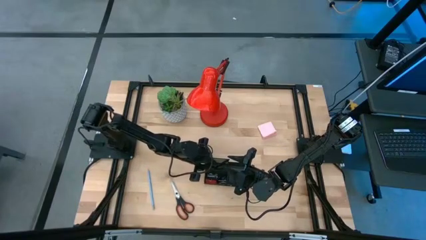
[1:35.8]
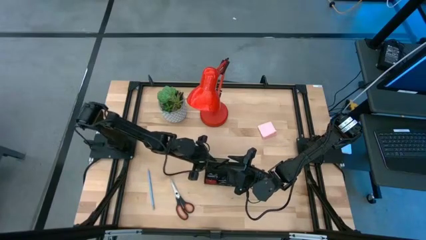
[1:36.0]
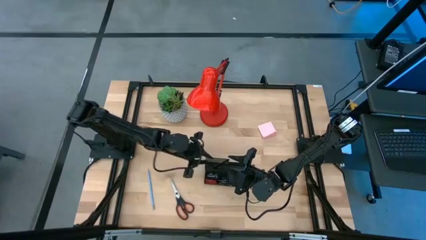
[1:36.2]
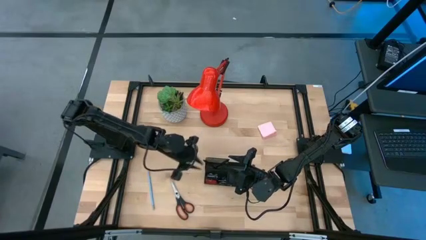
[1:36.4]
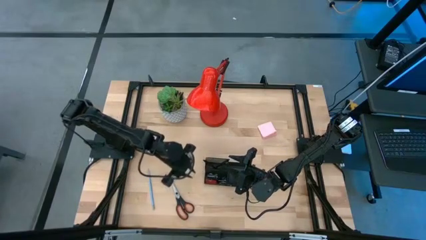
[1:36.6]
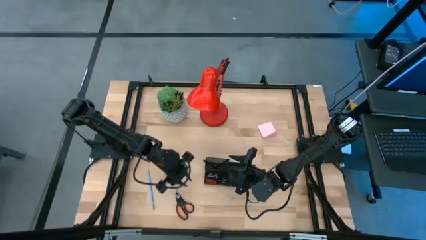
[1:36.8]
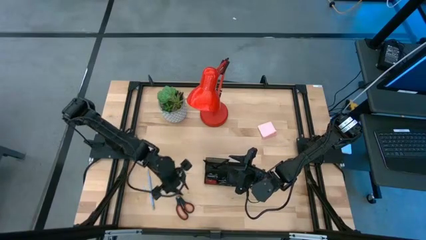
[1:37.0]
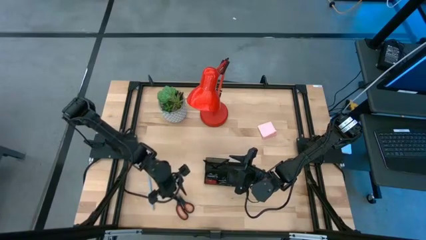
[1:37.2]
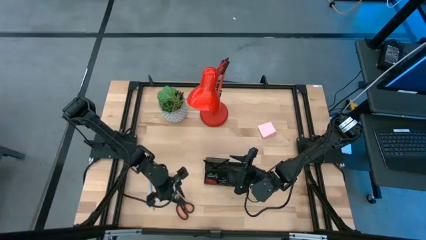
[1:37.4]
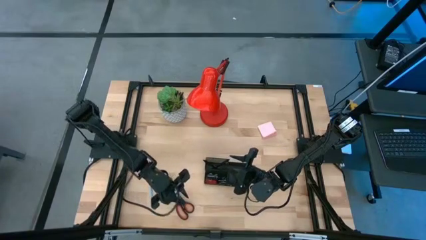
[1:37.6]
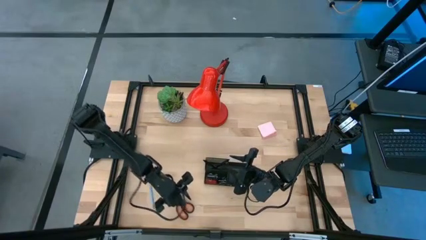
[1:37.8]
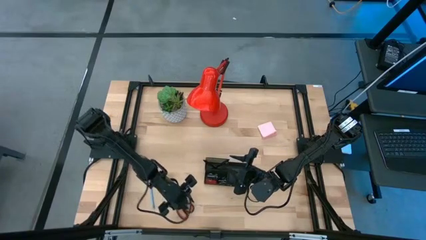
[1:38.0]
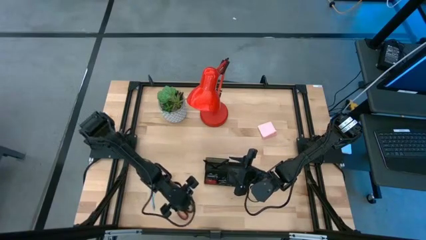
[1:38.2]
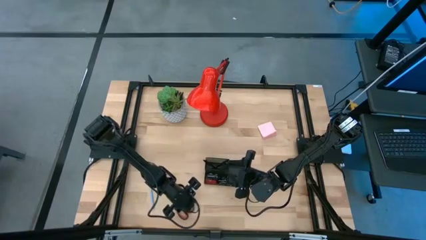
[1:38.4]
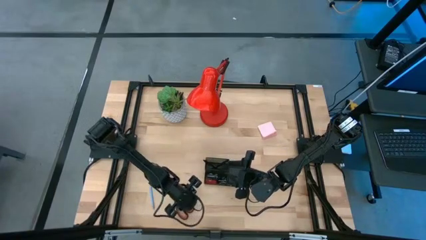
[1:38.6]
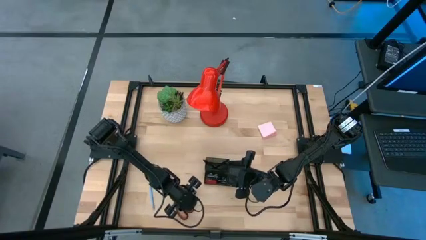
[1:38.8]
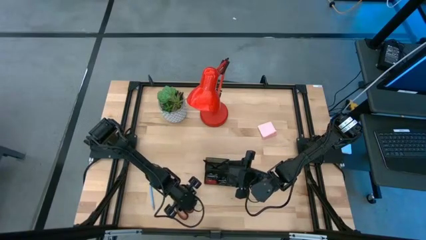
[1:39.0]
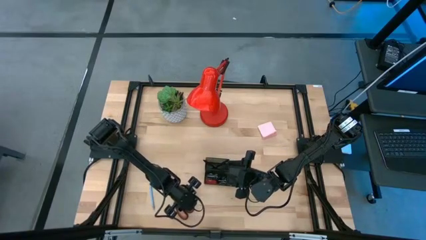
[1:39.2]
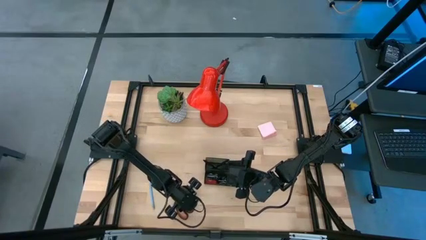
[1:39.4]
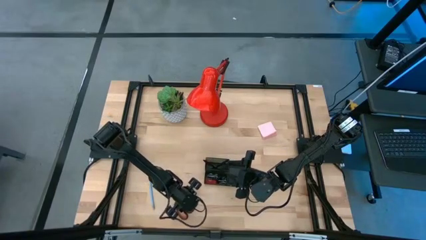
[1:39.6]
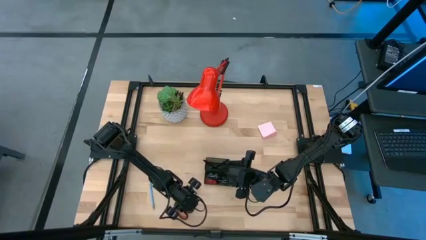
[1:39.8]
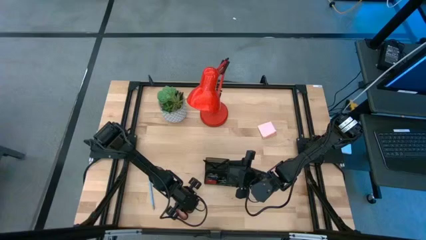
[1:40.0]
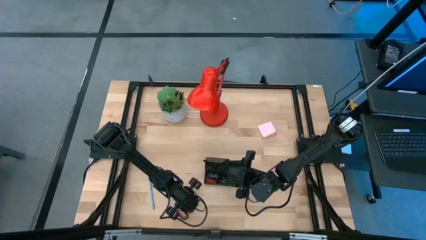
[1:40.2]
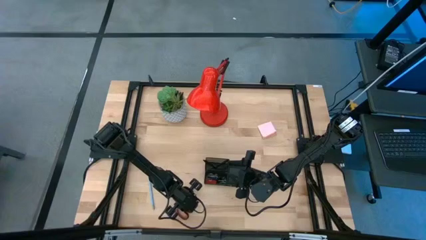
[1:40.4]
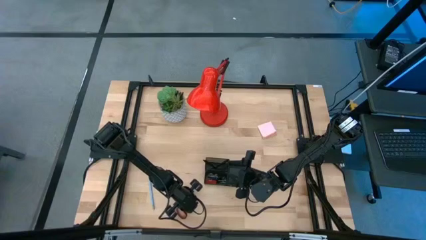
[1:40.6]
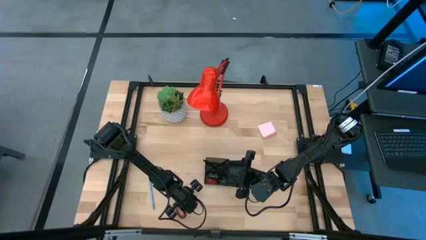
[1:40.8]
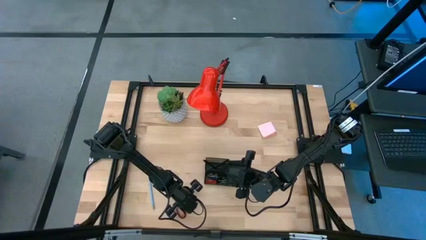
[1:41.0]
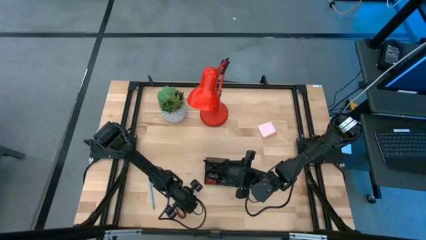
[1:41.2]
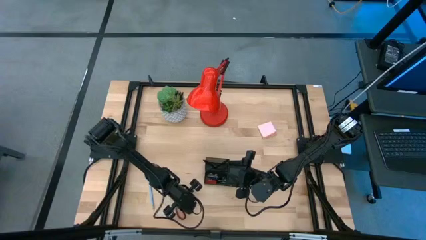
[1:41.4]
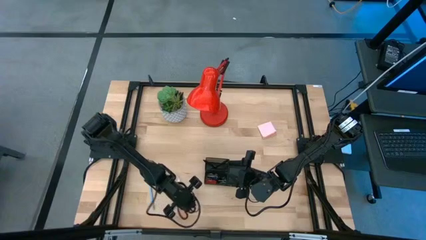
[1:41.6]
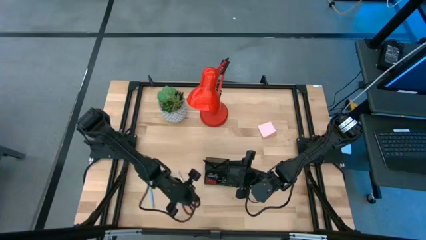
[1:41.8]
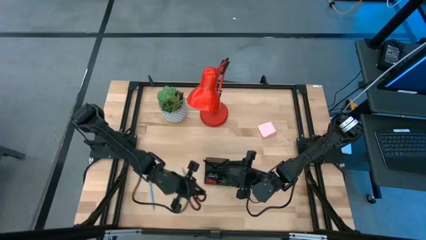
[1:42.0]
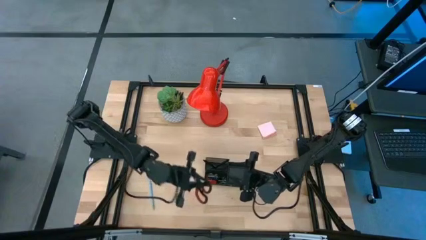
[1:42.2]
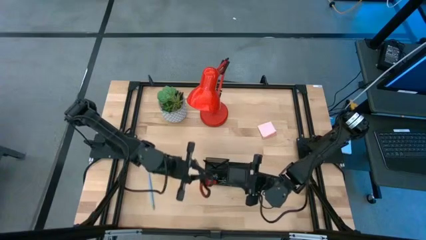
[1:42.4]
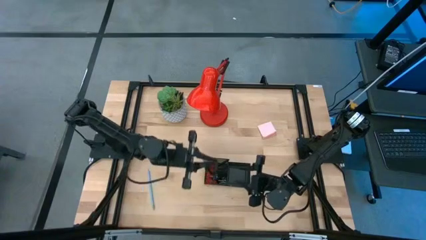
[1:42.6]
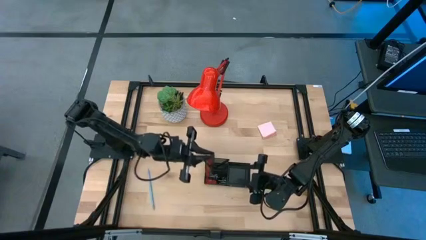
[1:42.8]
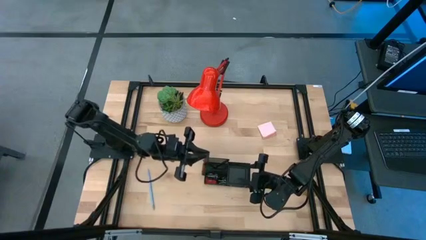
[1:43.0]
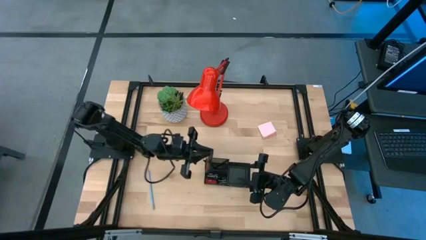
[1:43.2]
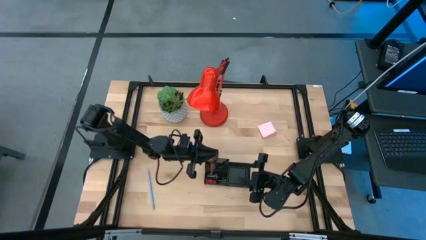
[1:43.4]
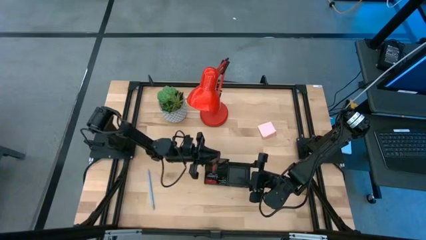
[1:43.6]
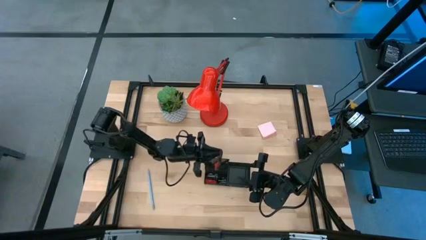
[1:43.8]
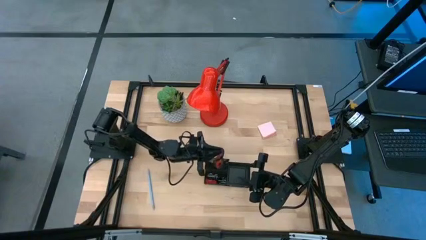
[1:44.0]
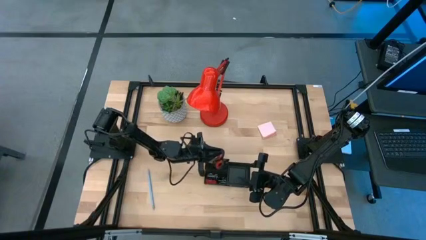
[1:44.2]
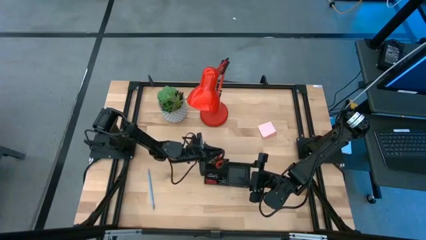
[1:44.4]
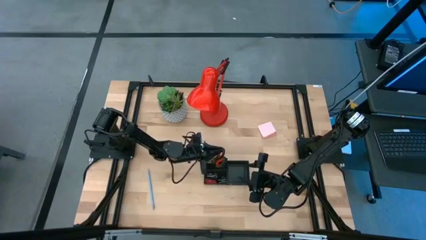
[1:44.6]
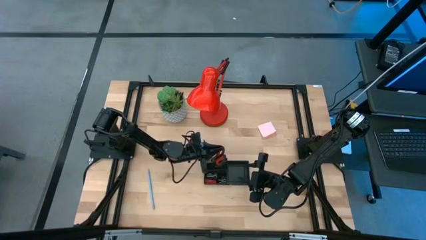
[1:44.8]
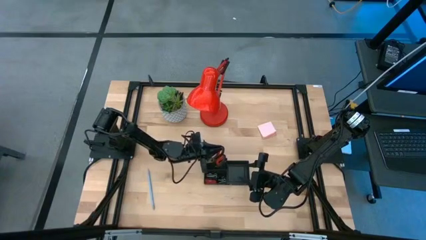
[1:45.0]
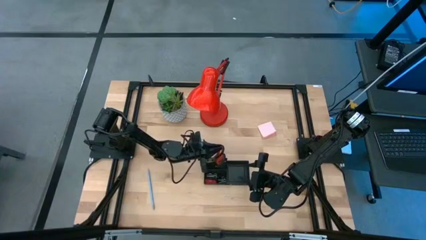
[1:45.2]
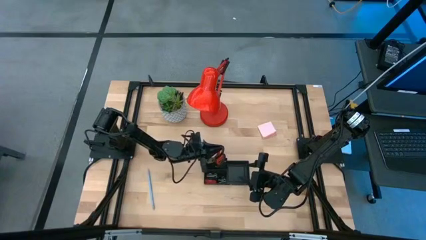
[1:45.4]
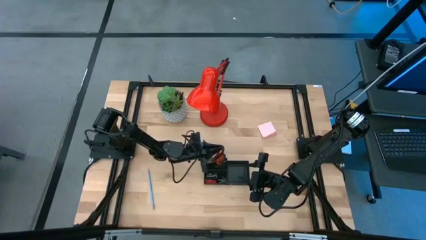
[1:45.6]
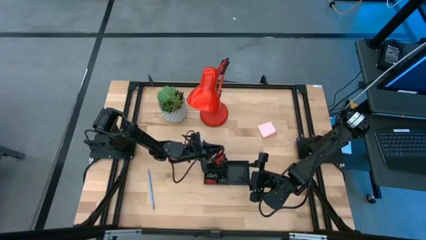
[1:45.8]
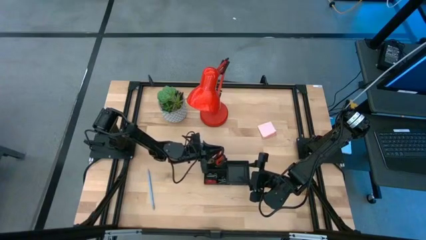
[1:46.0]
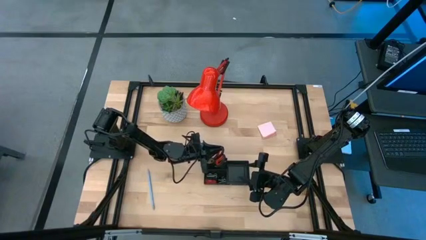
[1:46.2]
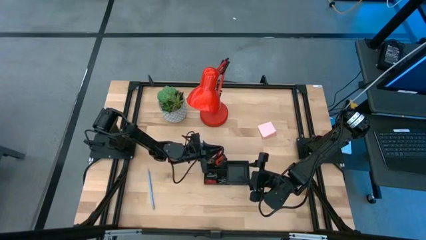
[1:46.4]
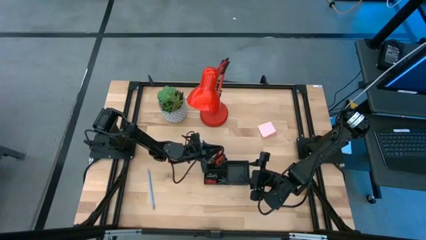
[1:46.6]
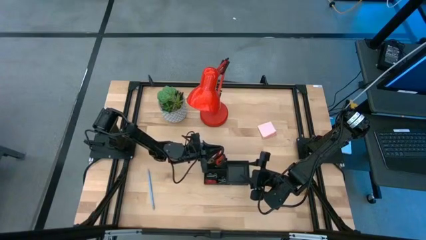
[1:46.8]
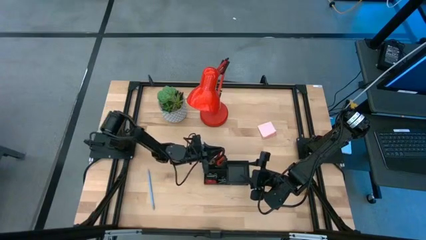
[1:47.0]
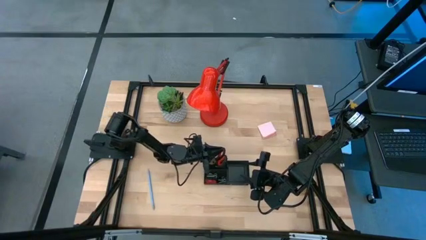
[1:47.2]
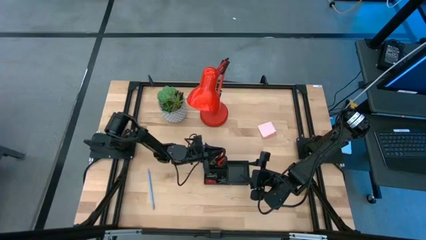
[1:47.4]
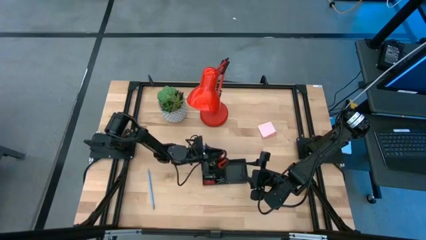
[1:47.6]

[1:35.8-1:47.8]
Task: Pick and place office supplies into organizer
Put the black scissors into the black desk organizer

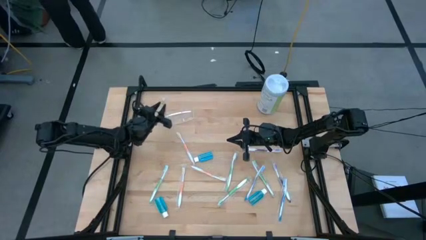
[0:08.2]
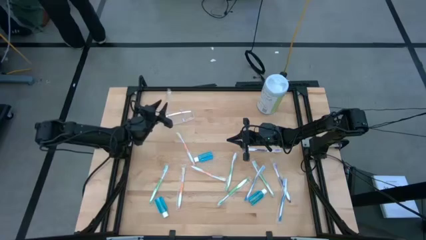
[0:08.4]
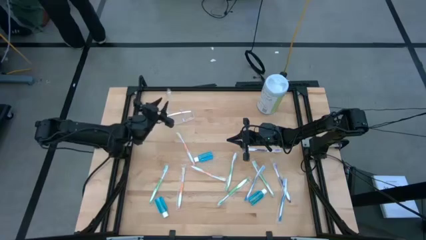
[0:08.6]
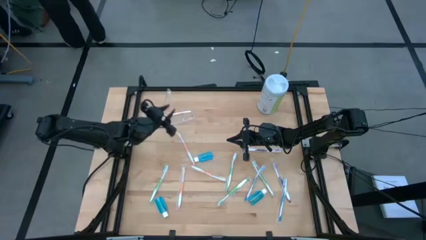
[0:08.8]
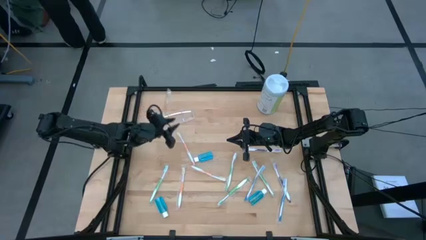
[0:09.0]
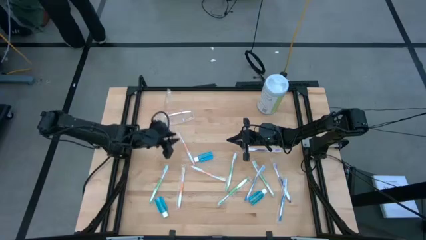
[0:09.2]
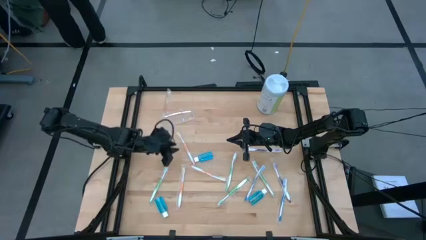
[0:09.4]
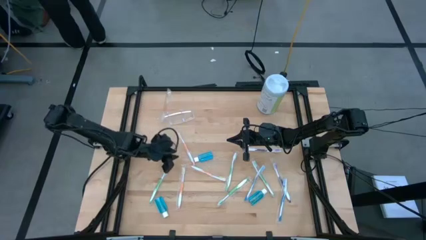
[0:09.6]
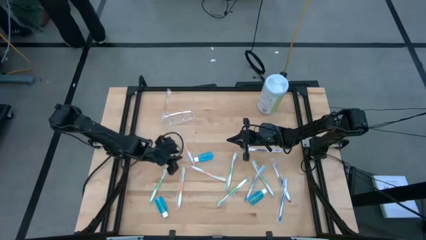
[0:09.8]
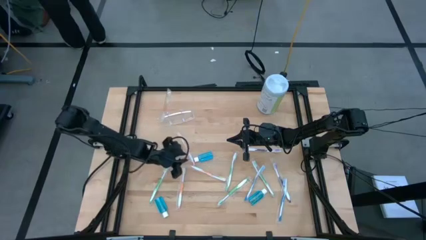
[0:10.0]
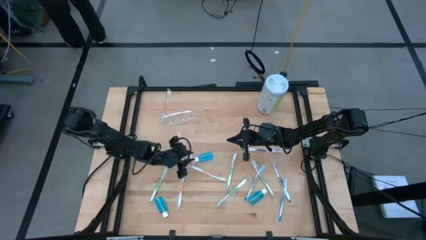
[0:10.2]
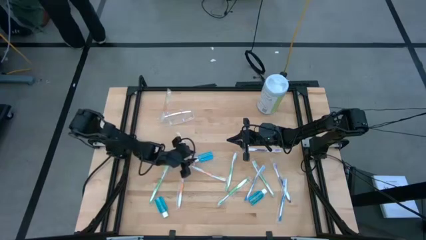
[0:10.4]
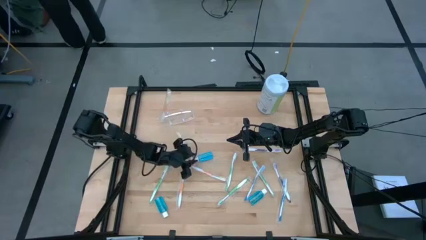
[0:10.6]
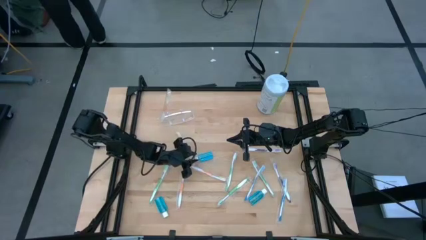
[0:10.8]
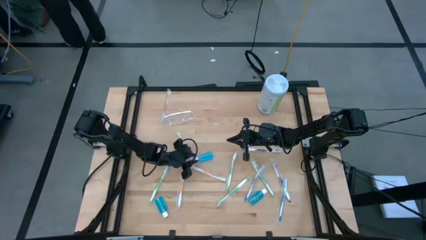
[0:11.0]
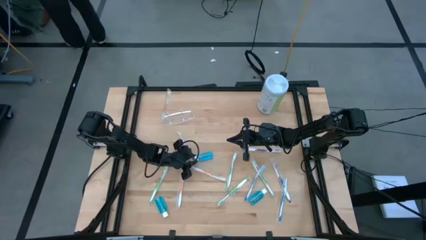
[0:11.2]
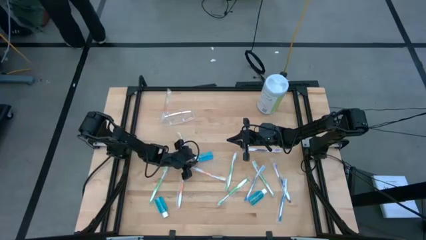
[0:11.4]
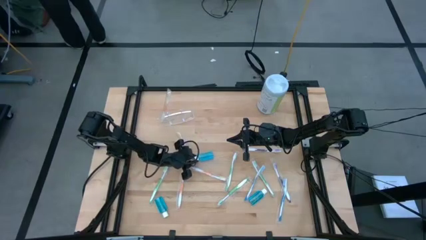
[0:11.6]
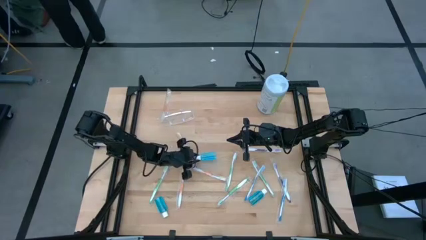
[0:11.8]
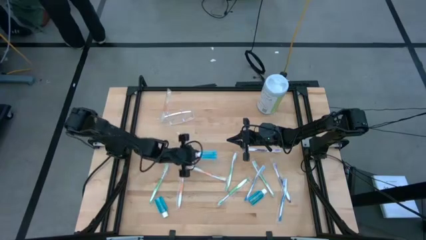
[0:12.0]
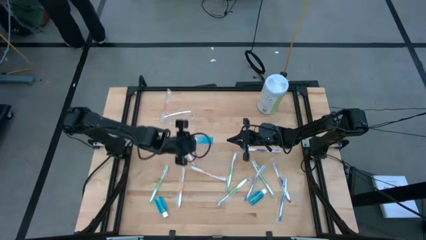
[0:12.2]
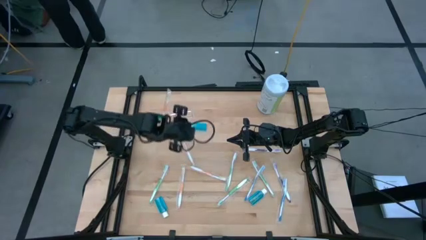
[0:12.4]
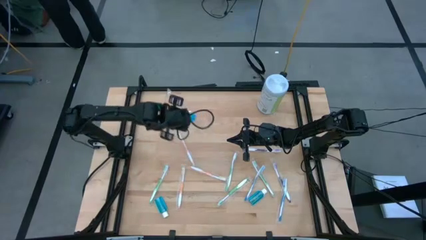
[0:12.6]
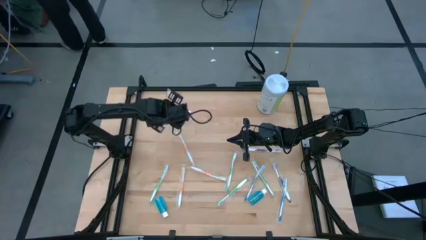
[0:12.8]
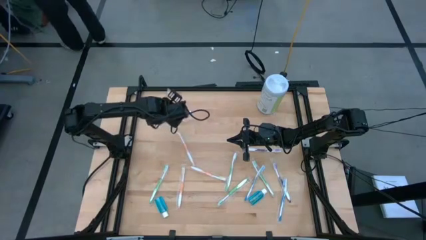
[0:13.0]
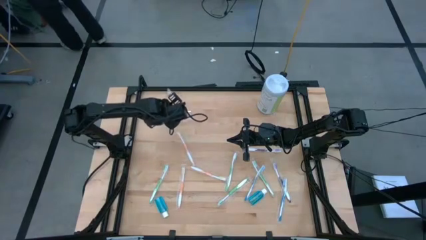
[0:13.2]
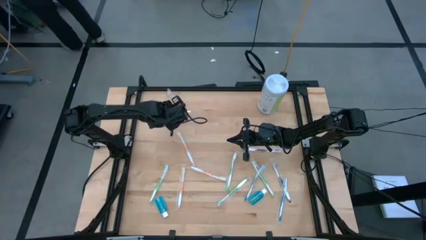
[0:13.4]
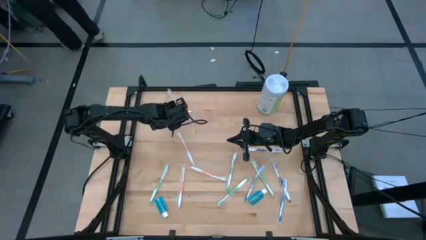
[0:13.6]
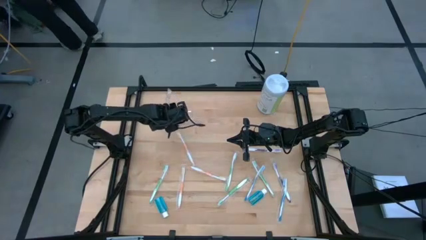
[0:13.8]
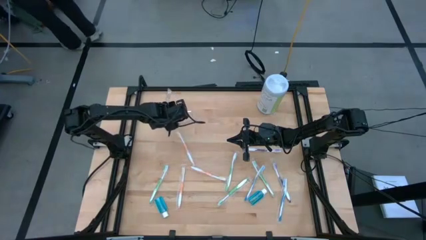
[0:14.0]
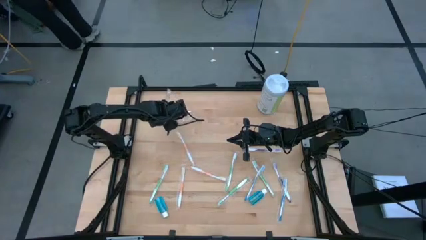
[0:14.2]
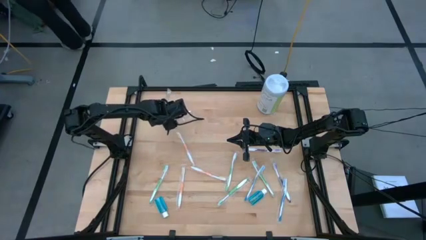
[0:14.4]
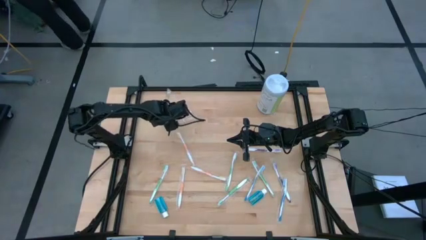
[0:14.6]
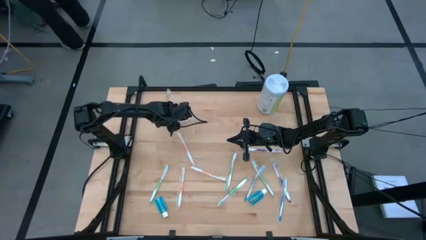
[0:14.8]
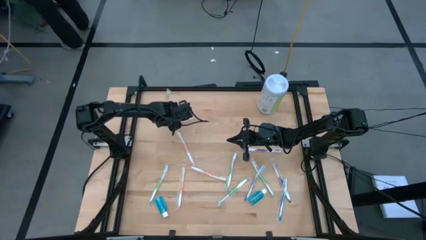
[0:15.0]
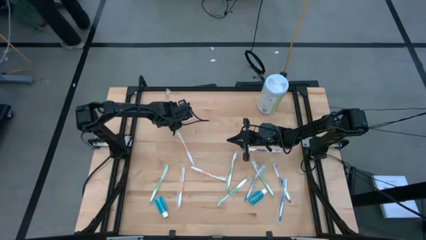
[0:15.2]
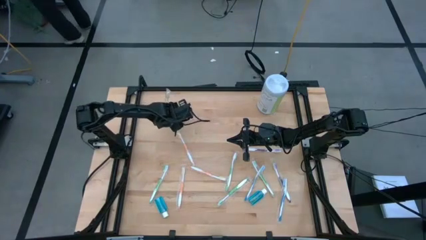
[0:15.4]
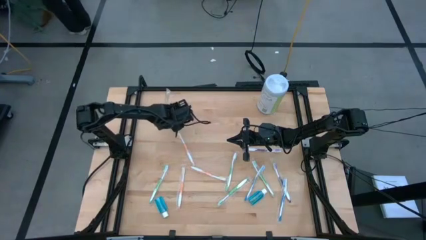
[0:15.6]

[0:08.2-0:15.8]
Task: Pick & Place toothbrushing station
Put the blue mouthwash into the transparent organizer
